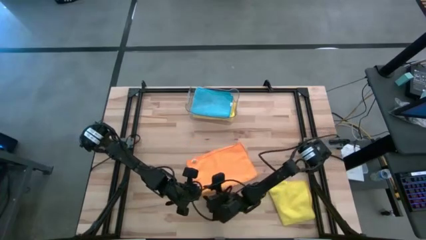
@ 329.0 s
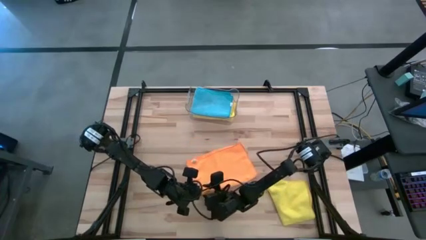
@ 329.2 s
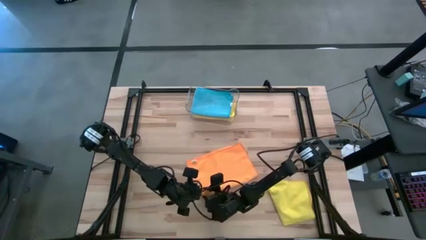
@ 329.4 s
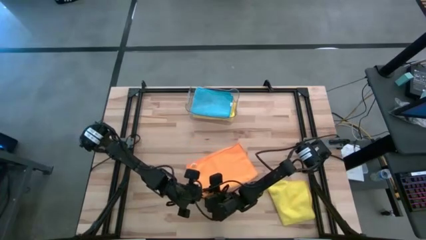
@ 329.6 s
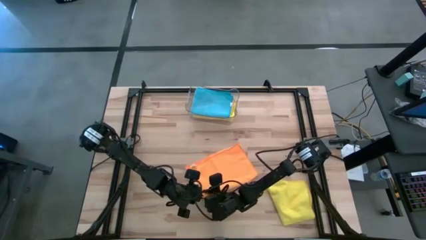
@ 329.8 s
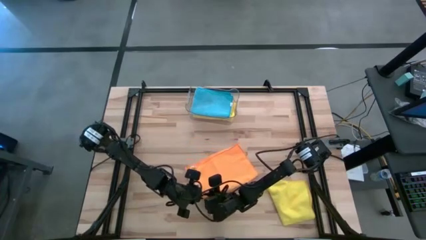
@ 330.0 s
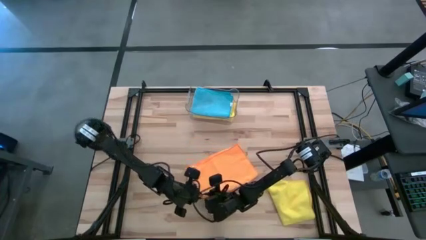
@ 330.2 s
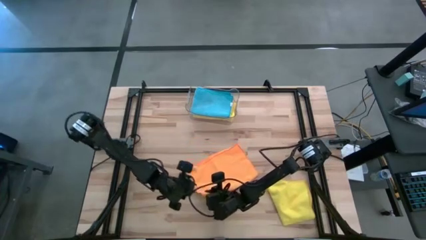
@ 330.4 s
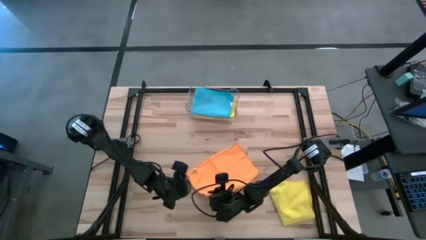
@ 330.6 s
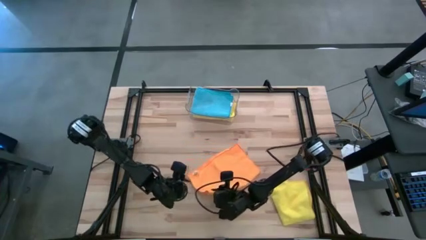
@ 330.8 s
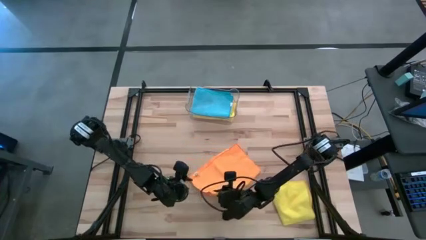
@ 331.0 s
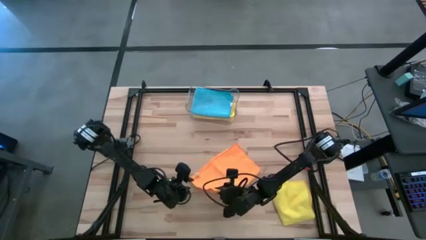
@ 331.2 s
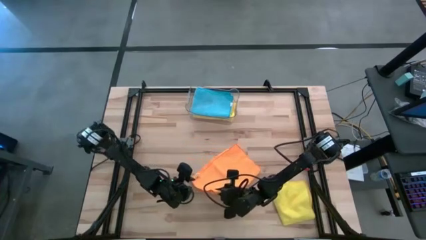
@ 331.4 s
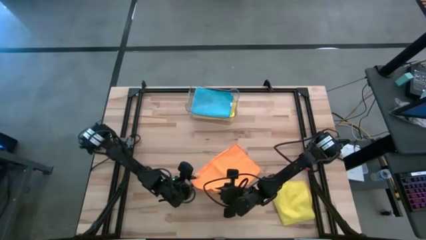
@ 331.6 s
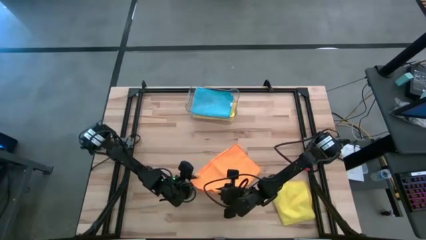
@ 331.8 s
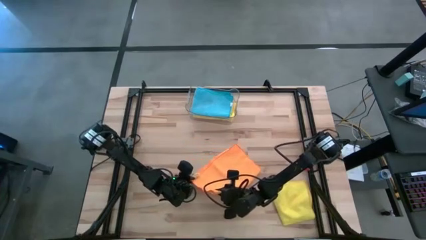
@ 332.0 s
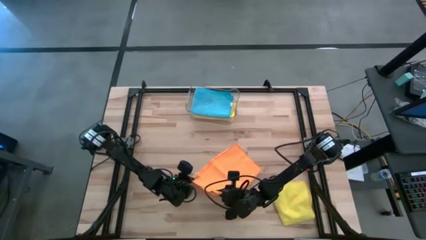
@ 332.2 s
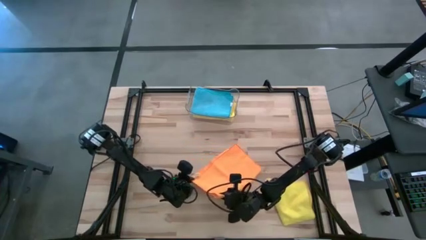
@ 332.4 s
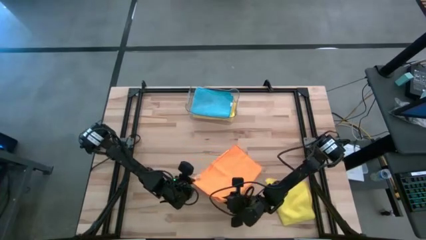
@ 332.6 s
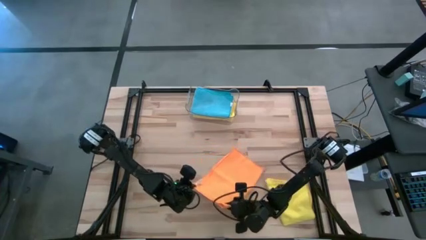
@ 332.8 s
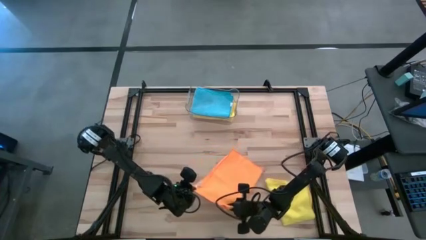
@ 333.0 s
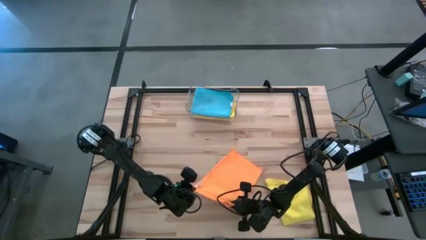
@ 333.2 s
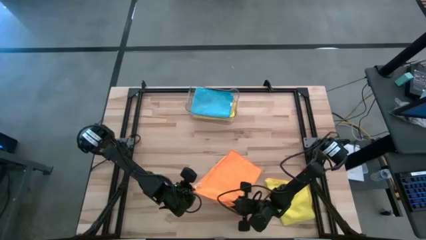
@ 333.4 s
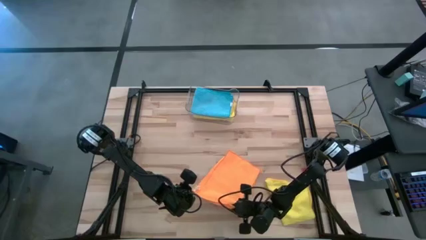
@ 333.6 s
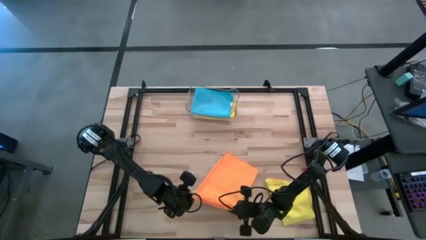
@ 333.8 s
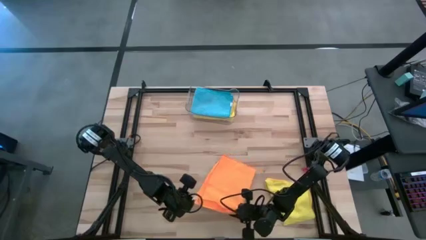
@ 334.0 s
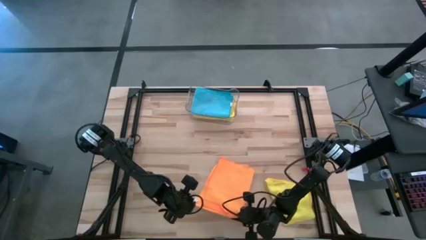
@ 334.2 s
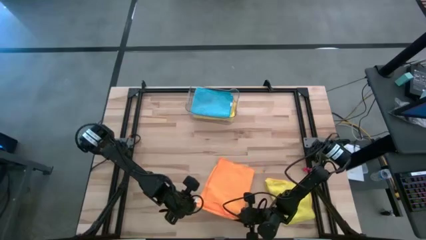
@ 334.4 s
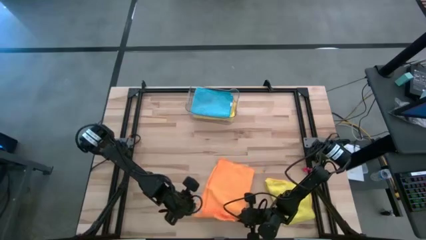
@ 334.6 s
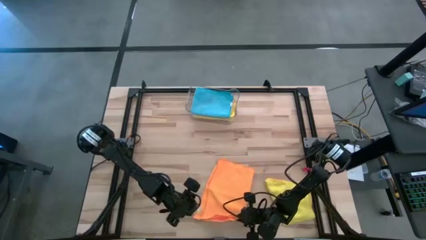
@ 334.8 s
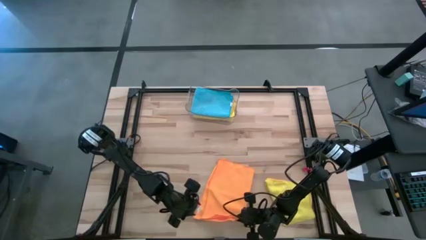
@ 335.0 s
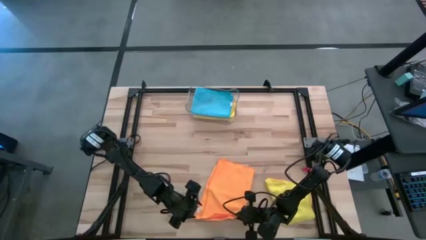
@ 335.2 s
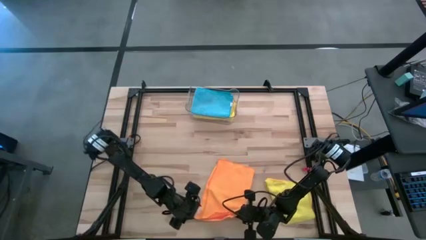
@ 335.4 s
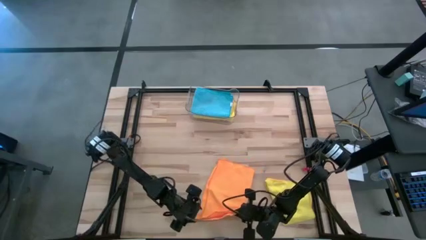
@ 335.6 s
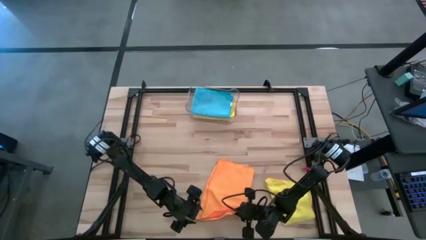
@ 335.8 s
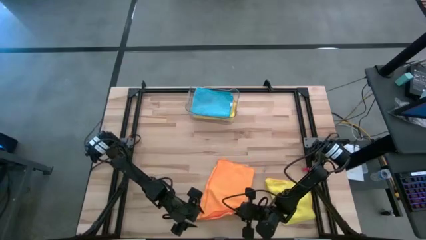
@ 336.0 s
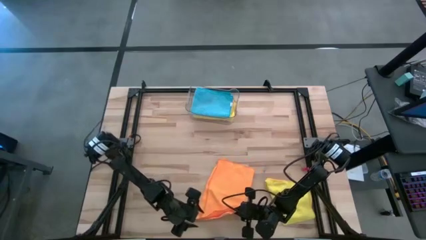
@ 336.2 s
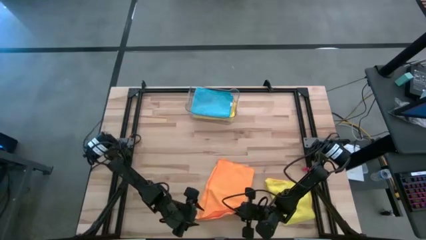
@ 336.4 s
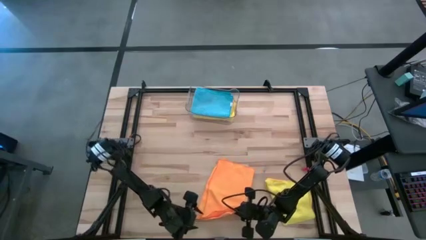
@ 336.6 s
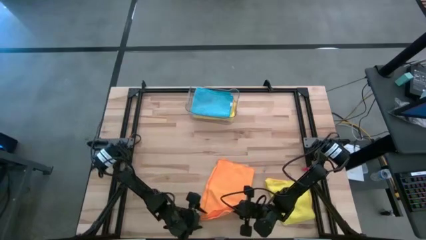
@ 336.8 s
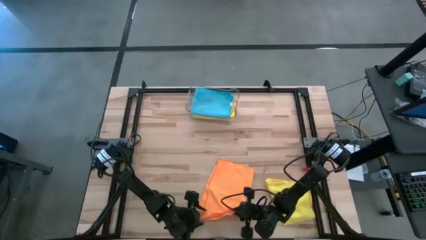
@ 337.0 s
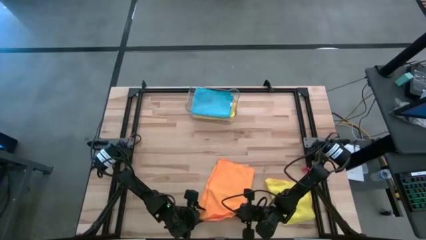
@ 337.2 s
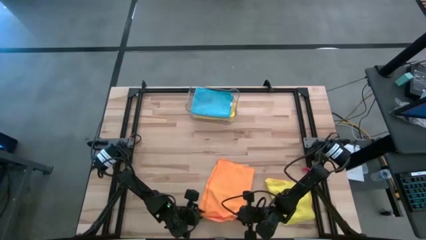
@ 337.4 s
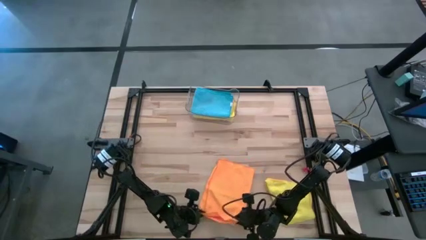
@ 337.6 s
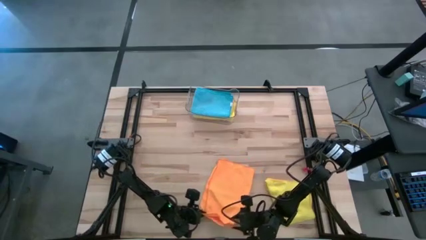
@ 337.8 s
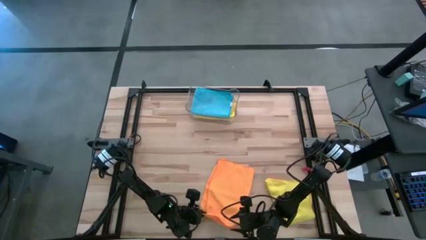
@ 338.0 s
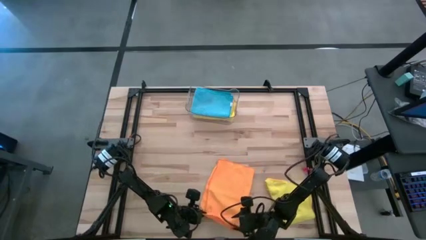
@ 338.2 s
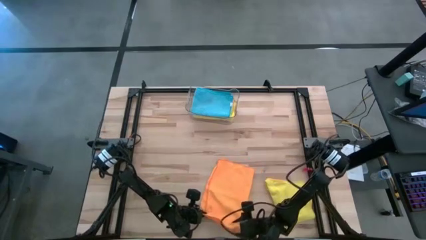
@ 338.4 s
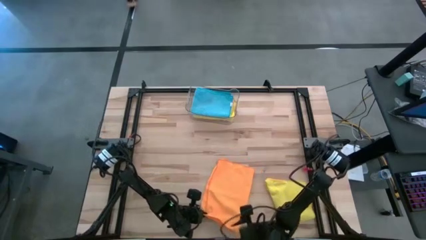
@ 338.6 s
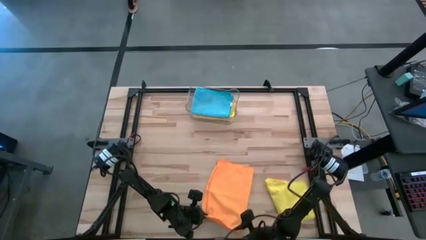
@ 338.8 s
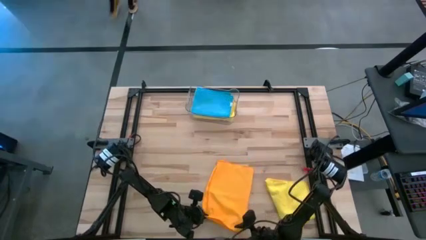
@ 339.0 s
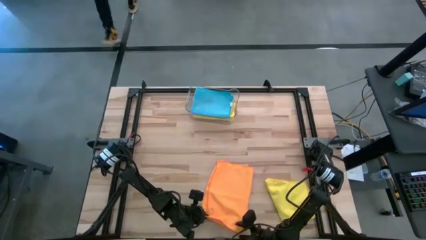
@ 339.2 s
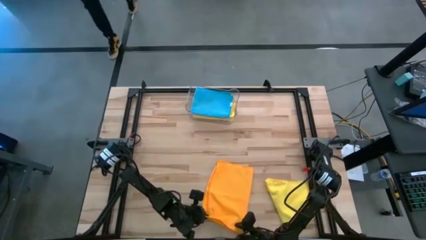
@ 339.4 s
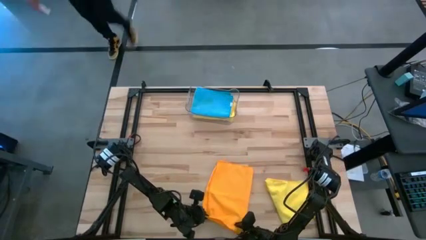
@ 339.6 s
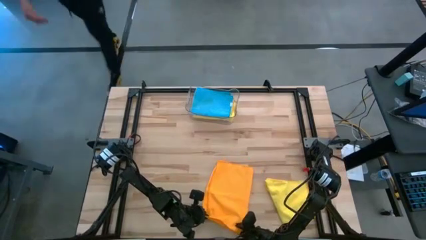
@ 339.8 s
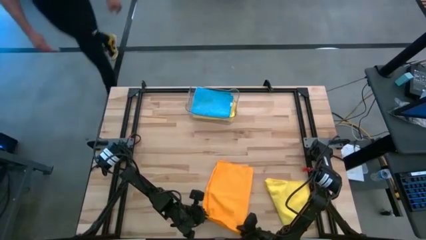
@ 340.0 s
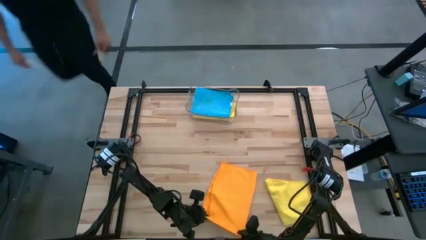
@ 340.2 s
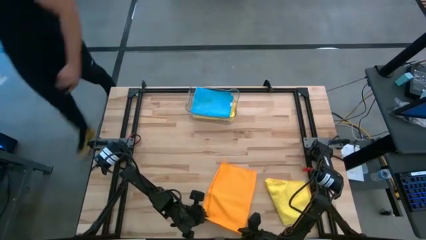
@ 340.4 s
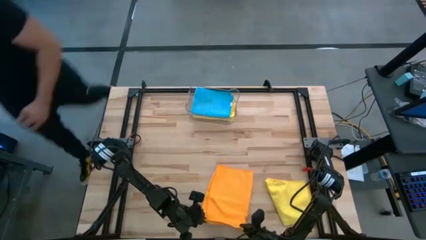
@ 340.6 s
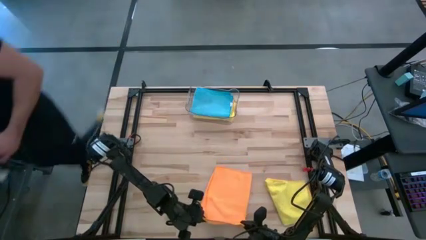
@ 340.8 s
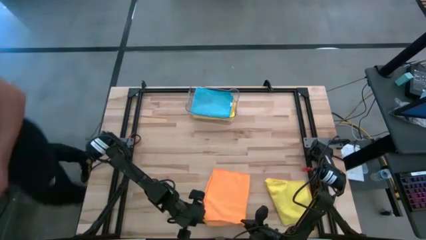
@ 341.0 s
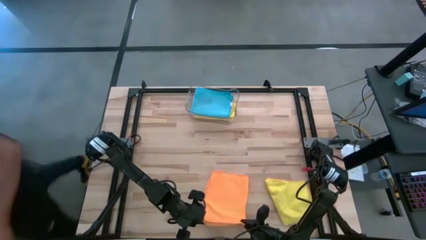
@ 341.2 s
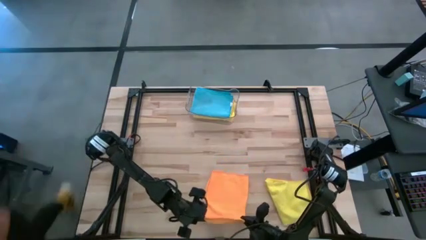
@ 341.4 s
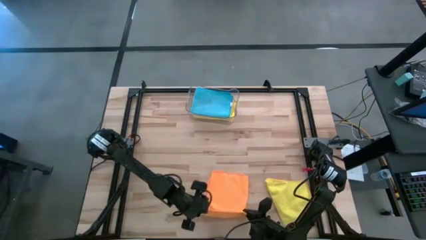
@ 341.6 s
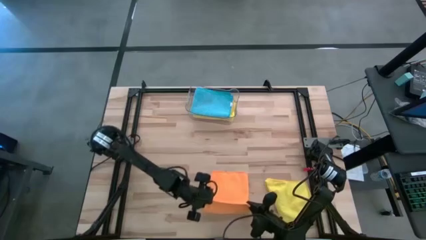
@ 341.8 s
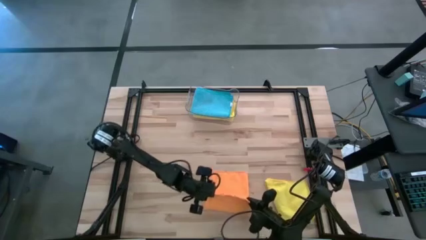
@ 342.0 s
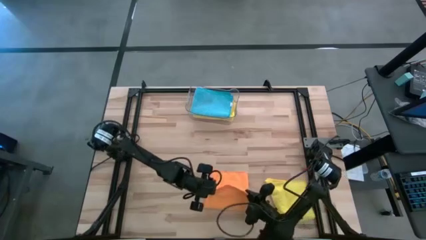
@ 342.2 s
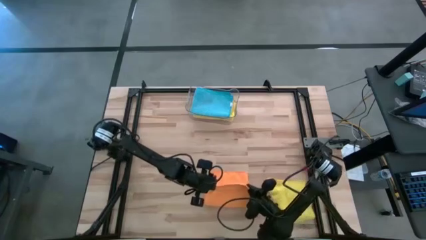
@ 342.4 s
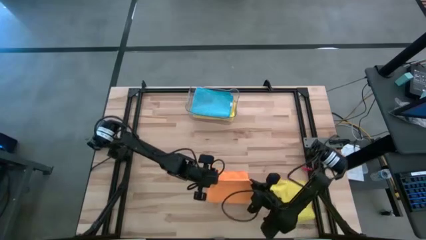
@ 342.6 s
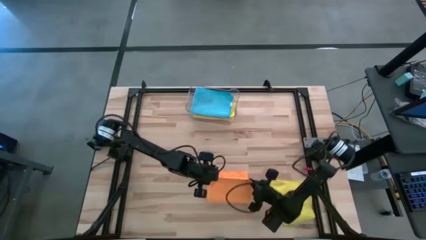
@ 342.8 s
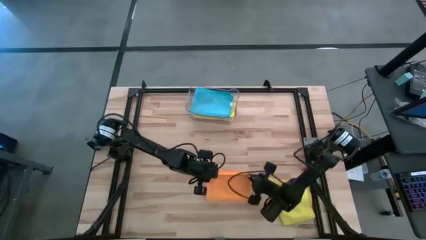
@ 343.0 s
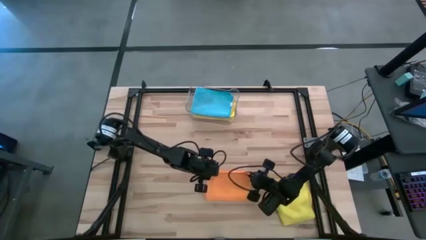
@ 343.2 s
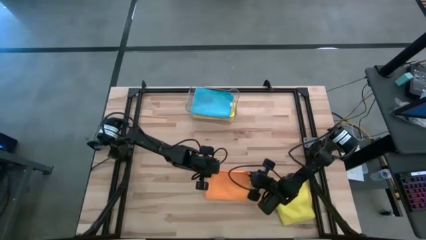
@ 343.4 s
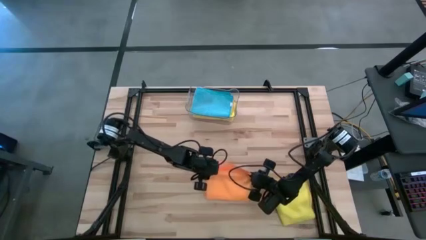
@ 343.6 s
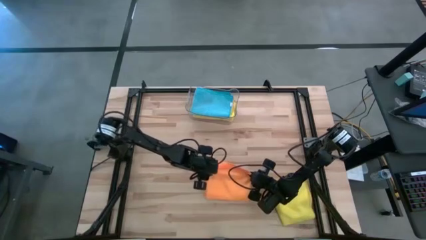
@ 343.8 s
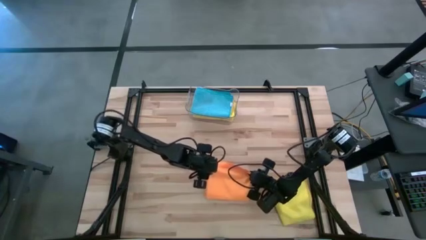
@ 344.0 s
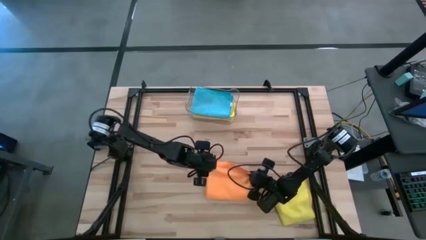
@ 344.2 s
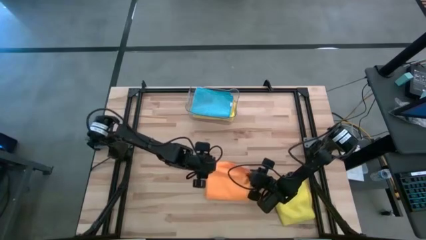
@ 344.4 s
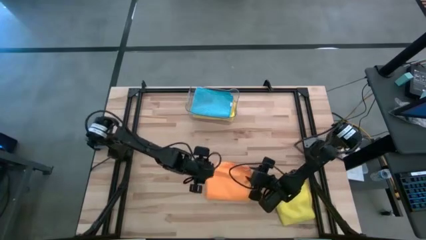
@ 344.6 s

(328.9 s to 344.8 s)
Task: Fold microfiber towels
Fold the orange microfiber cloth
